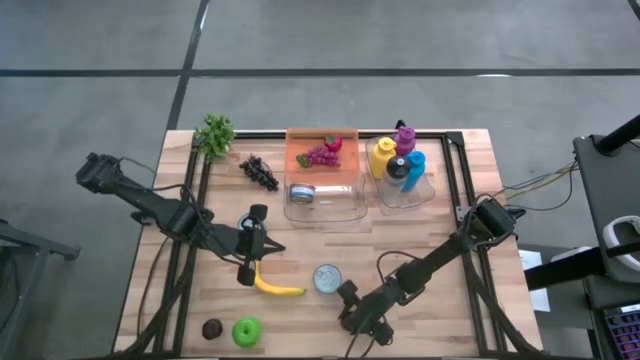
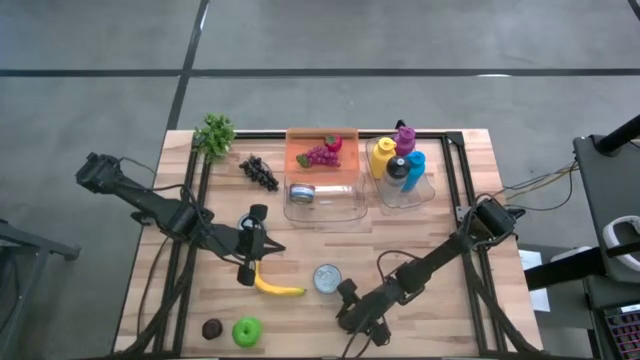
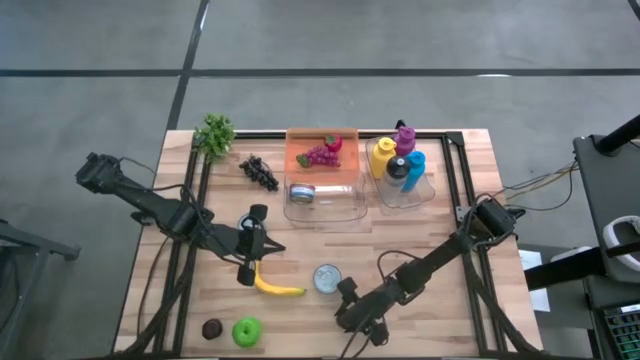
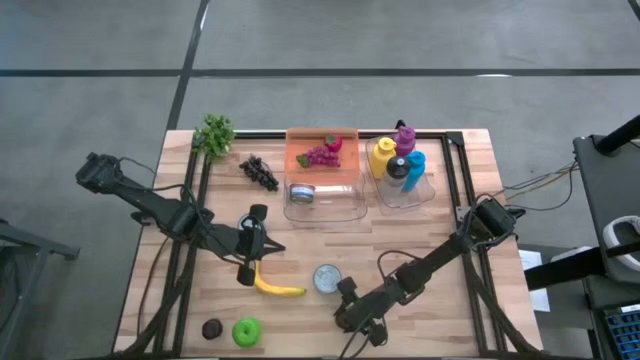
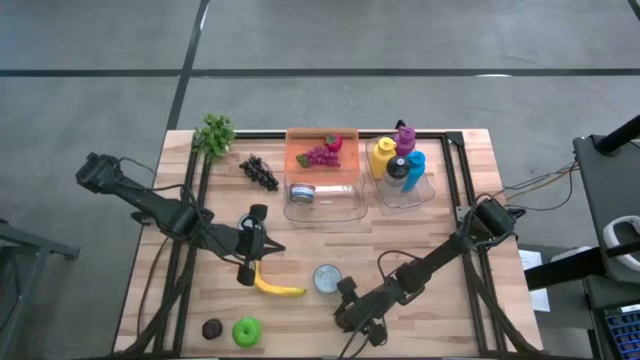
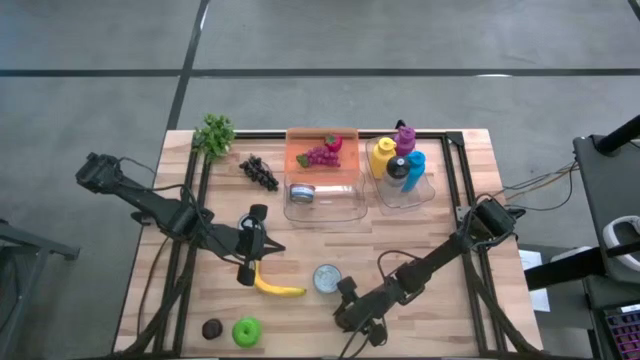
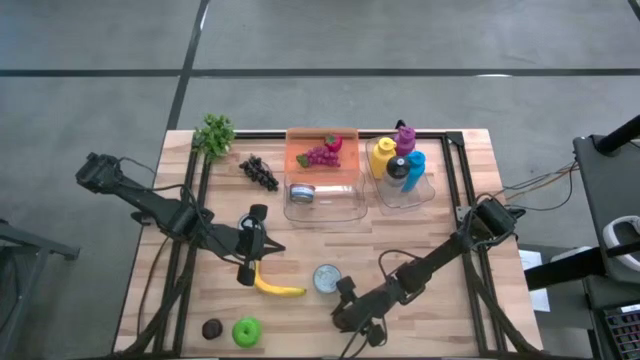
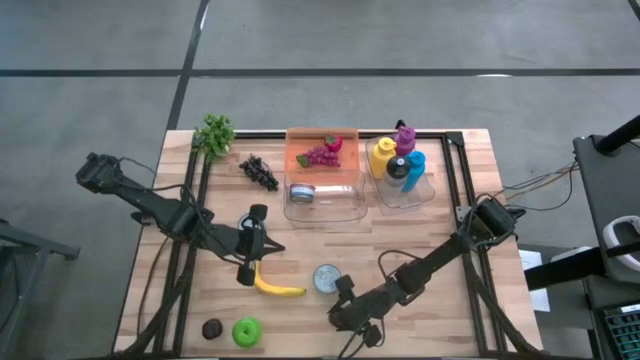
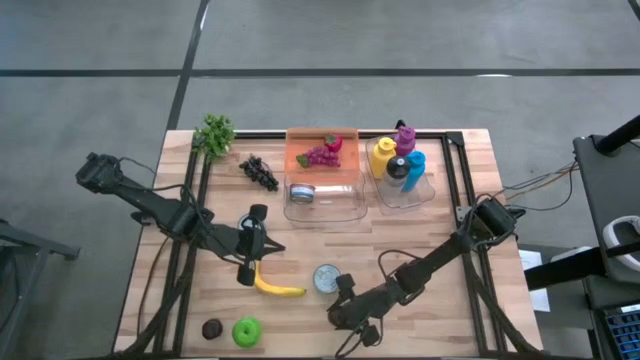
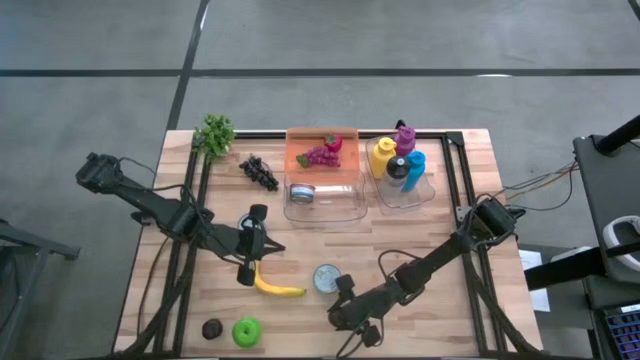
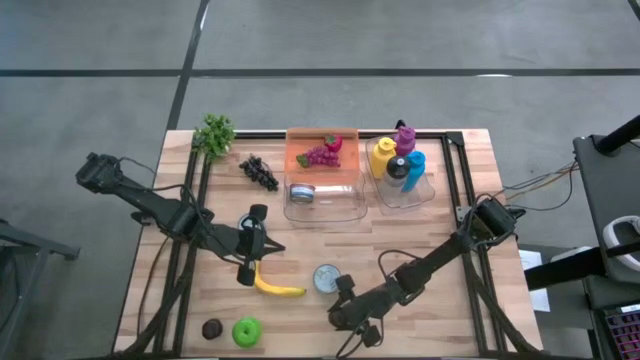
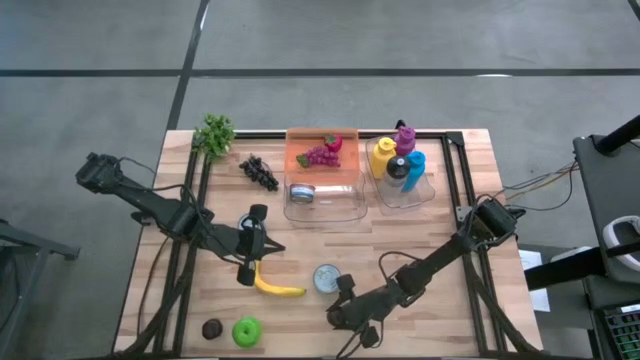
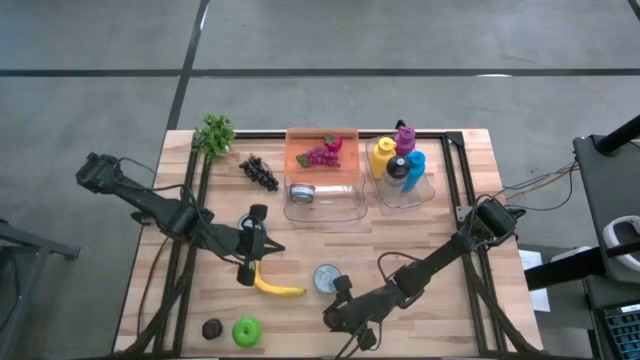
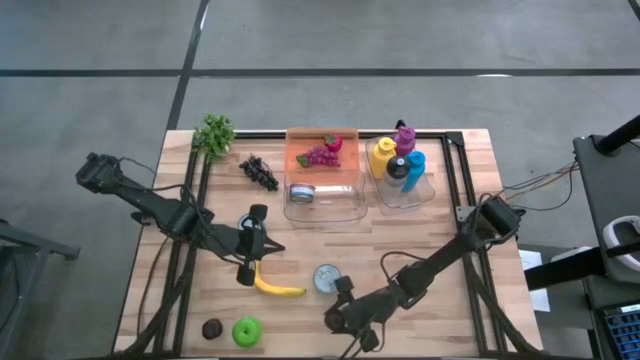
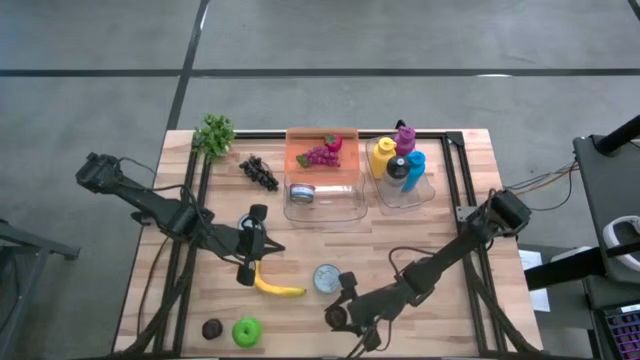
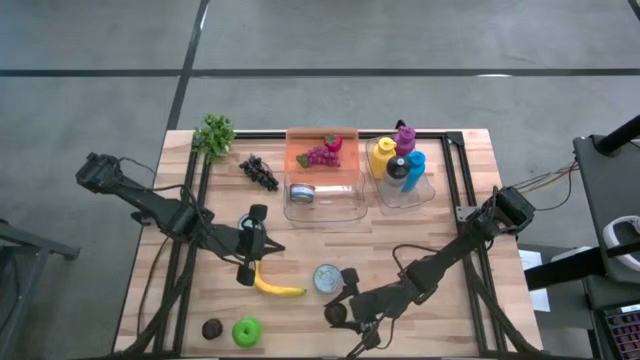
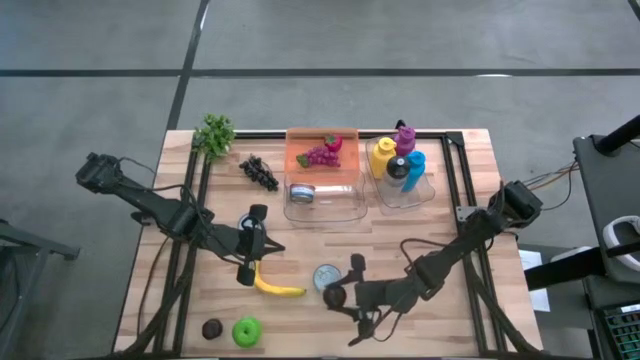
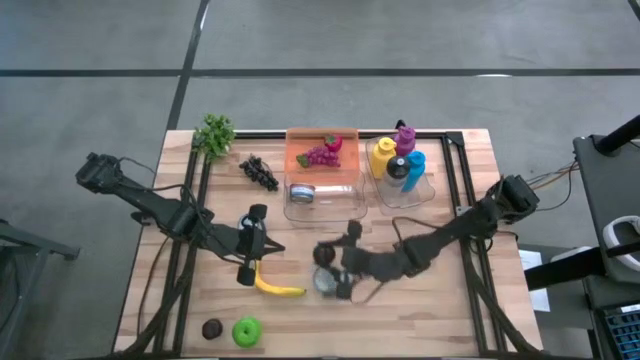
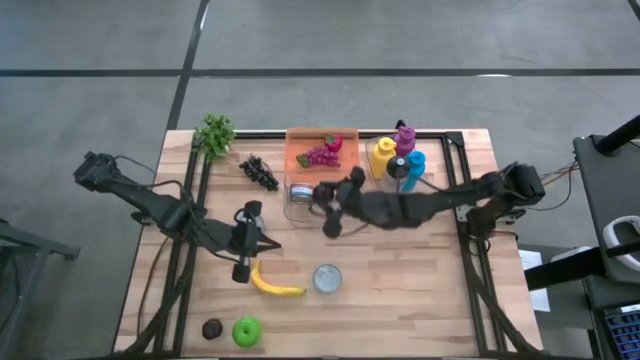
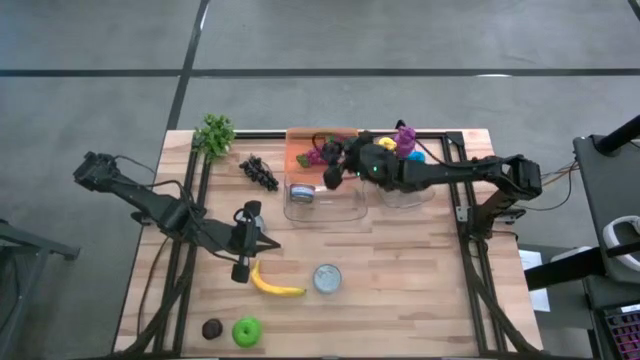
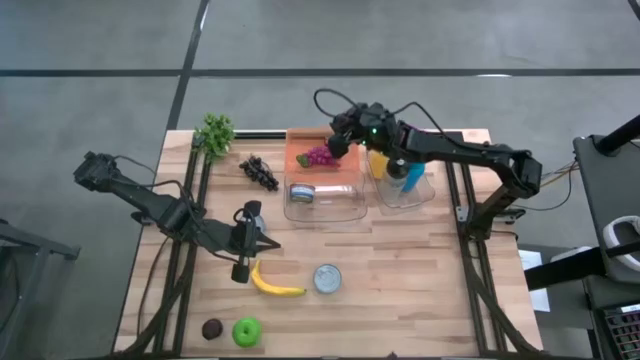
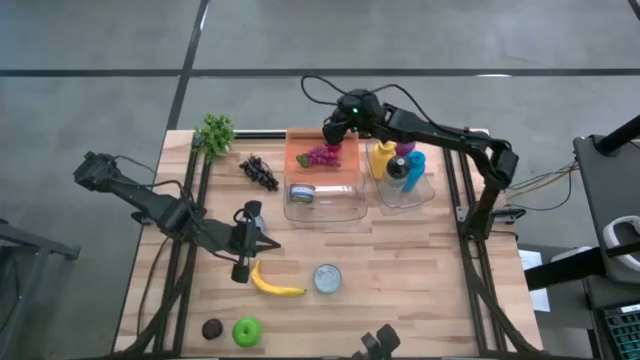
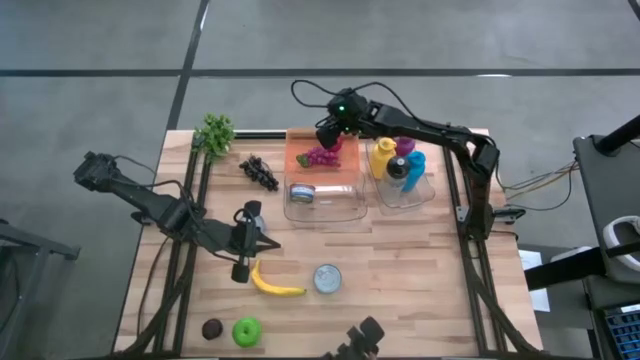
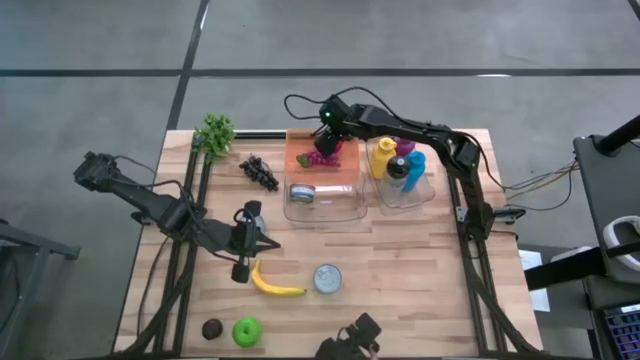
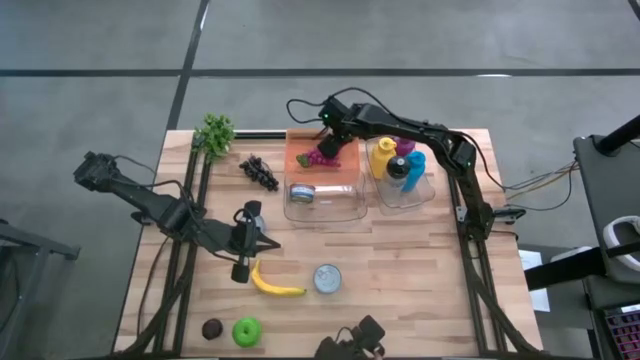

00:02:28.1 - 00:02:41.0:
Task: Pick & Place Food Item
Put the right plum into the orange bin

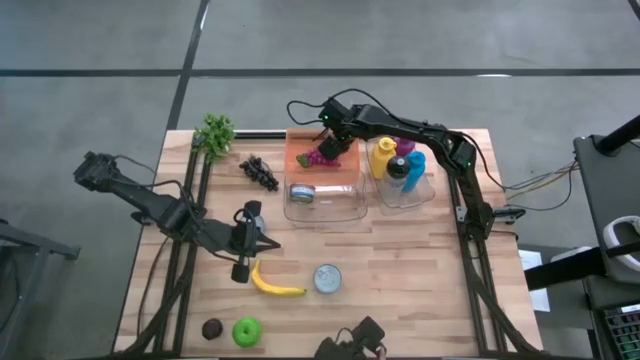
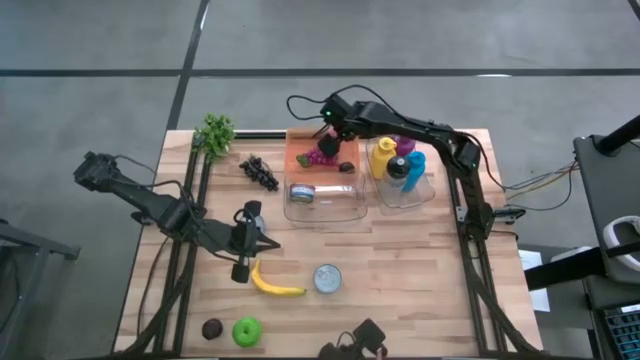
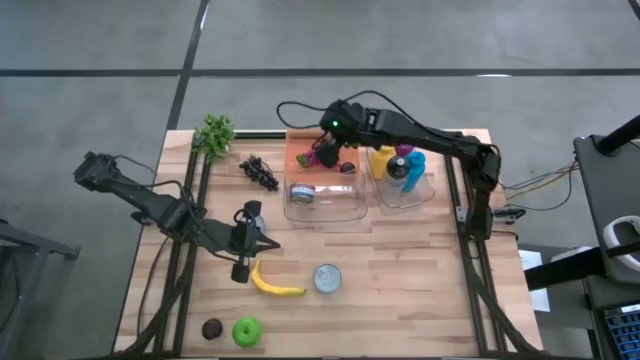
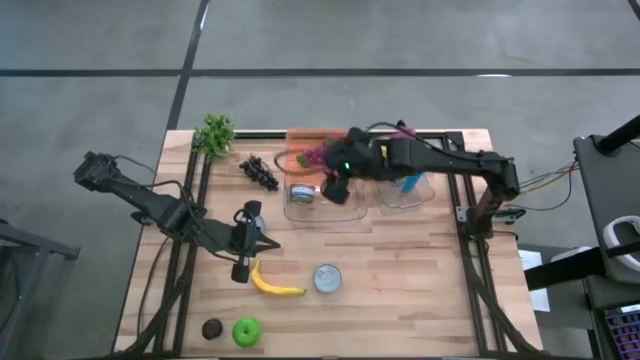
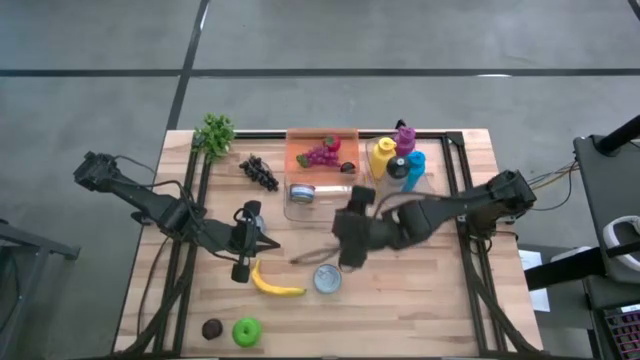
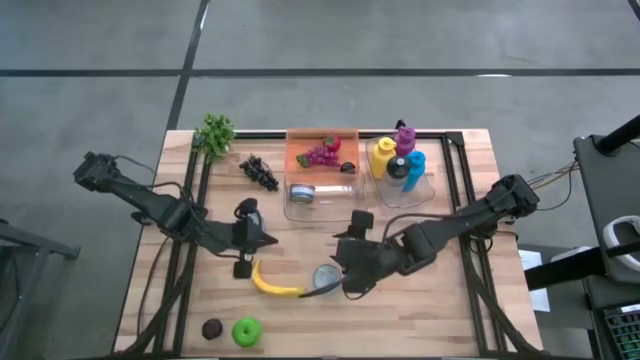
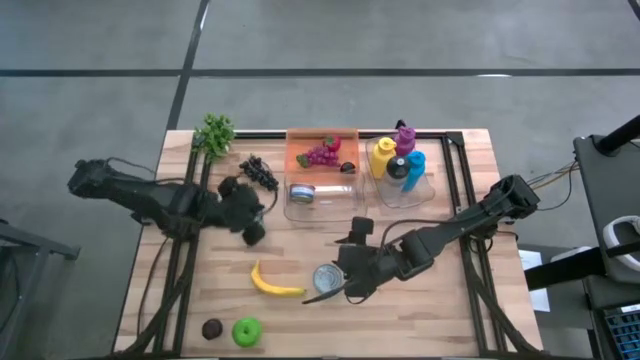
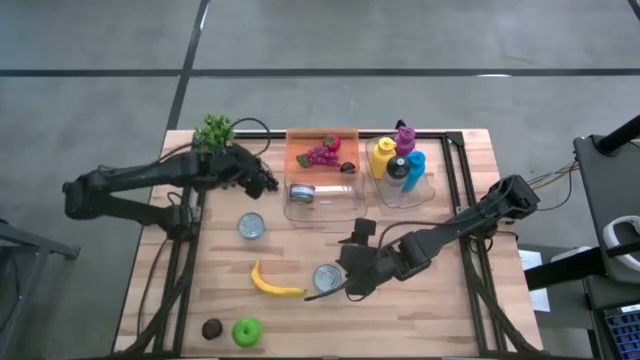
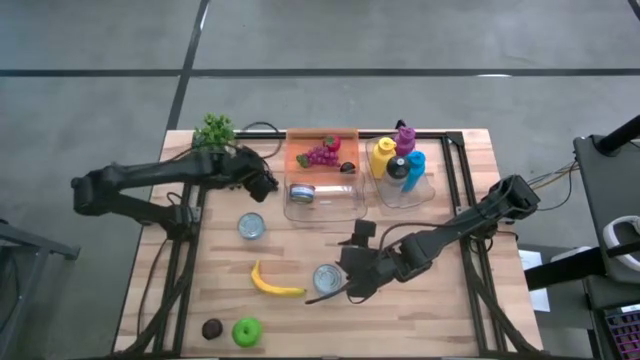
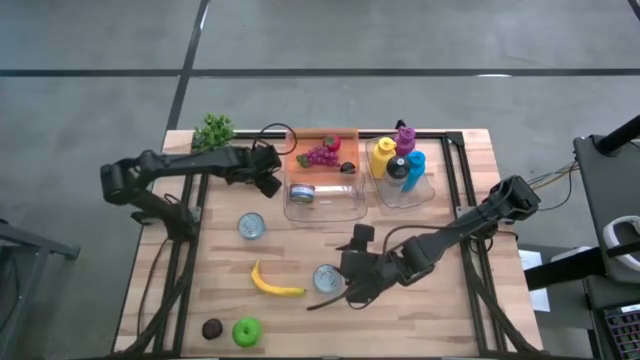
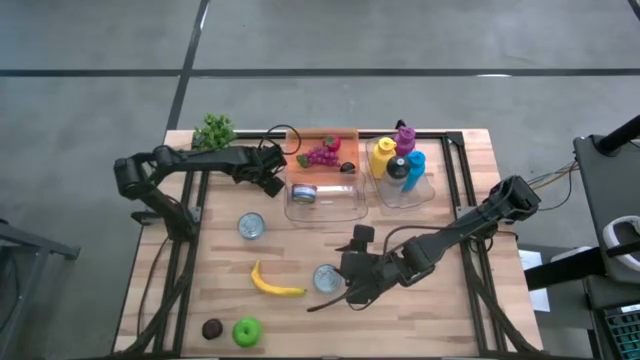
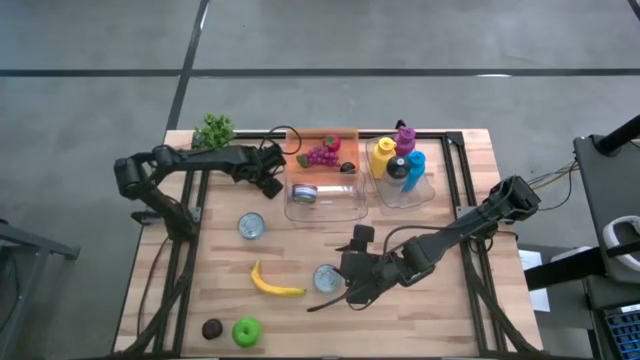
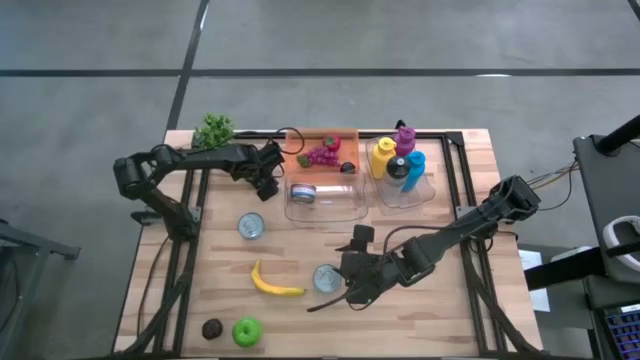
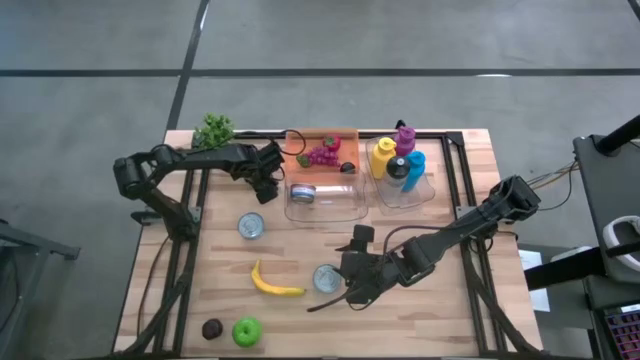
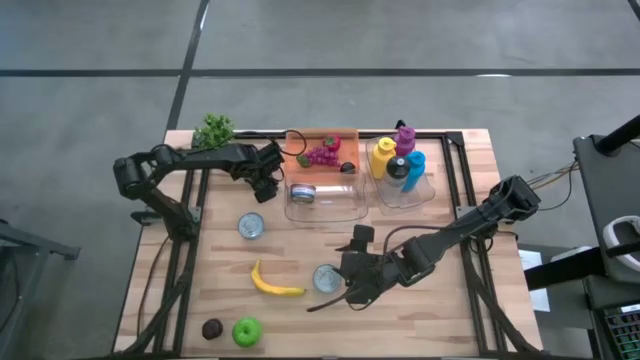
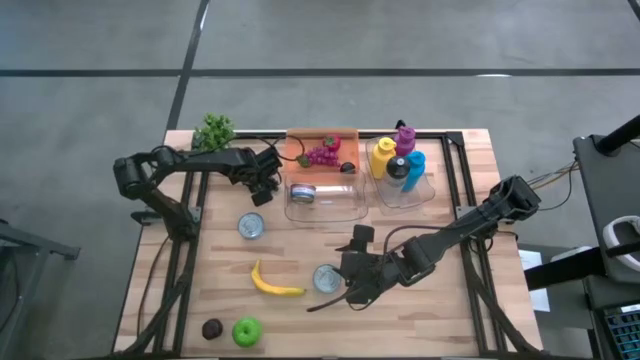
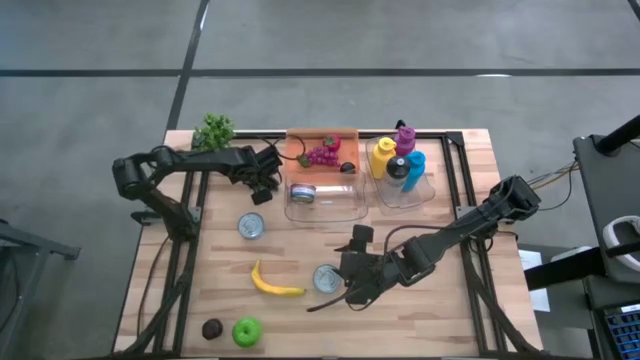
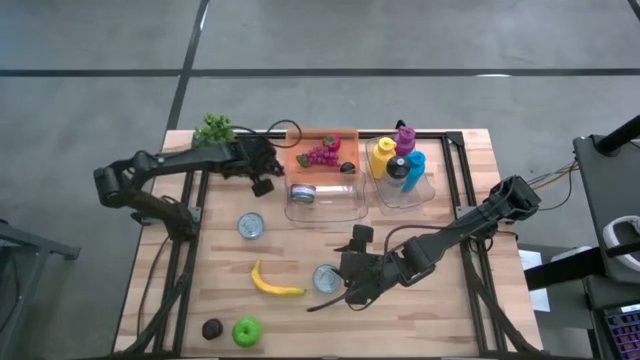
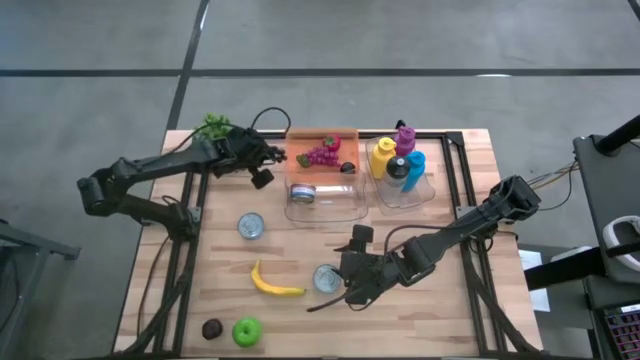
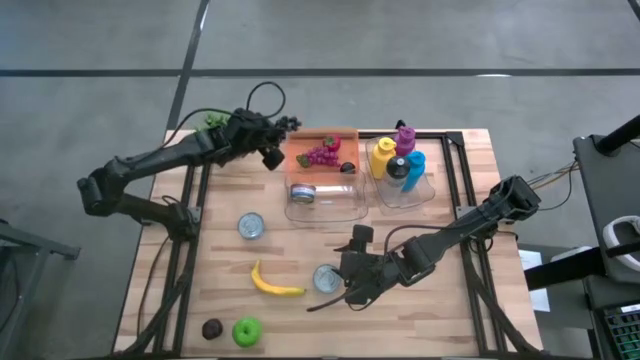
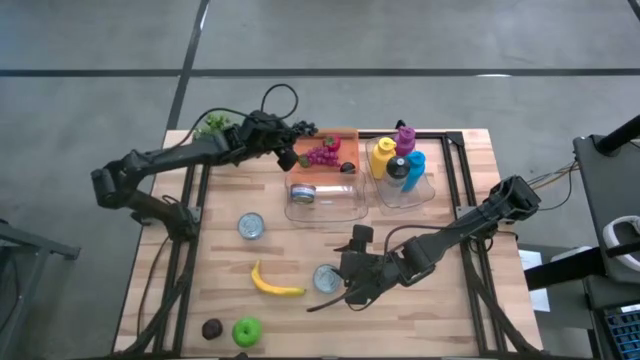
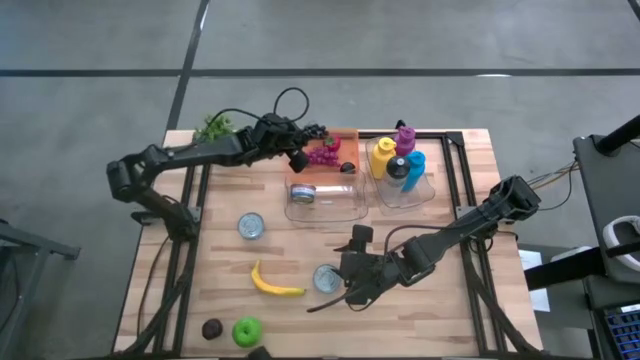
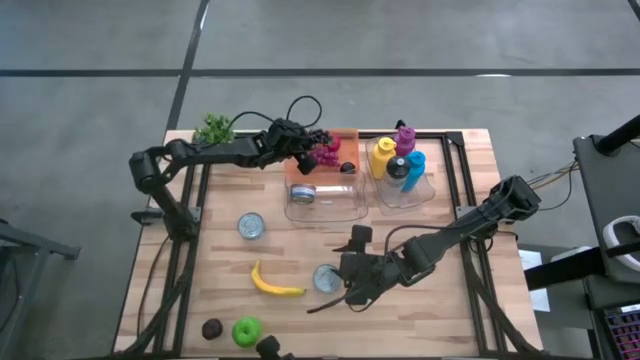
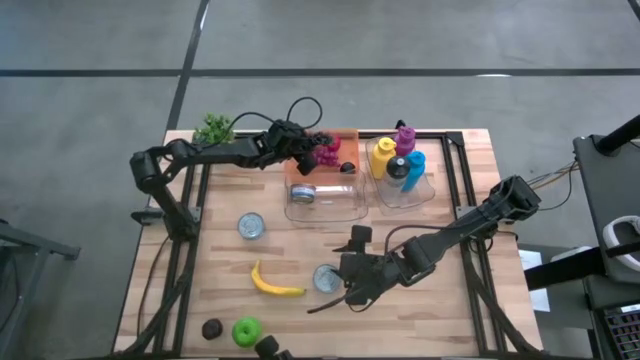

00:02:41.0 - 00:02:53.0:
Put the black grapes into the orange bin
